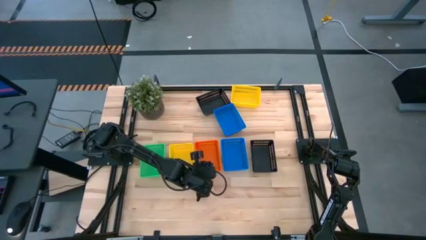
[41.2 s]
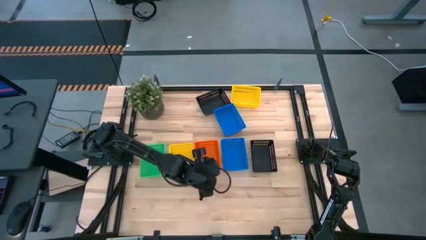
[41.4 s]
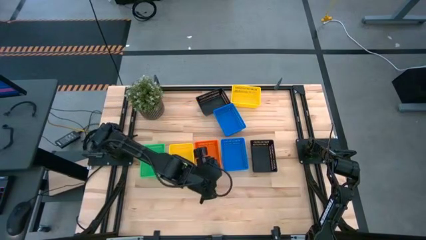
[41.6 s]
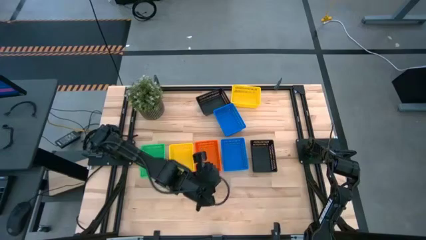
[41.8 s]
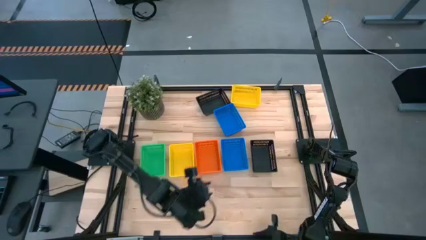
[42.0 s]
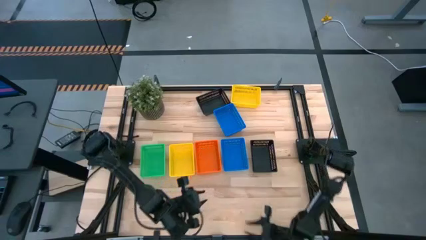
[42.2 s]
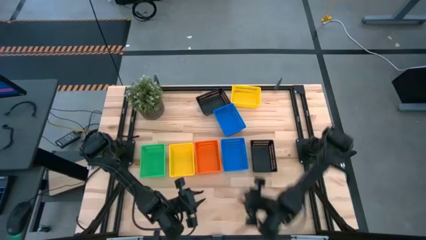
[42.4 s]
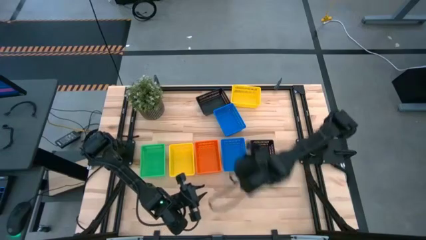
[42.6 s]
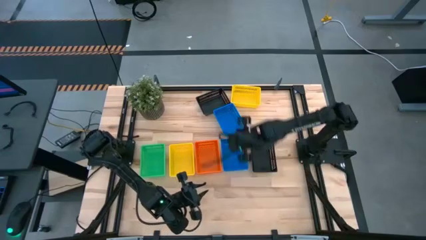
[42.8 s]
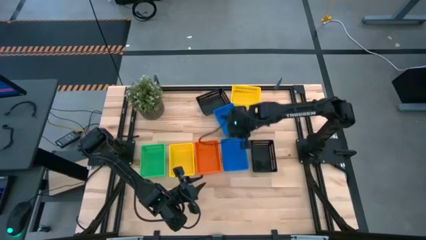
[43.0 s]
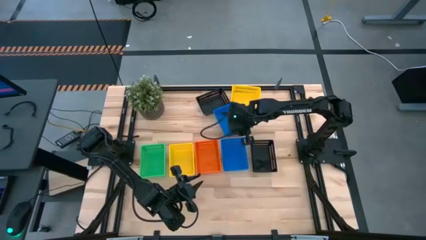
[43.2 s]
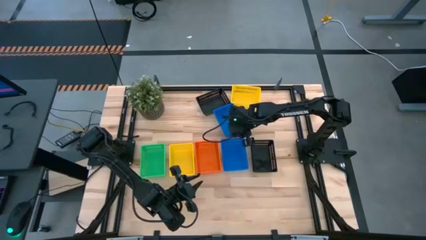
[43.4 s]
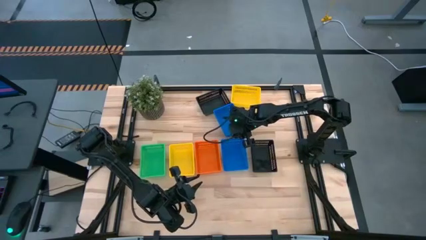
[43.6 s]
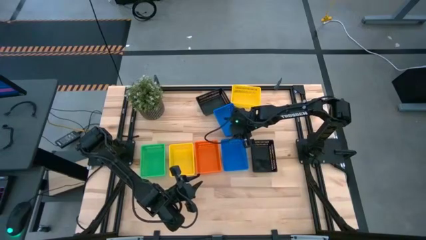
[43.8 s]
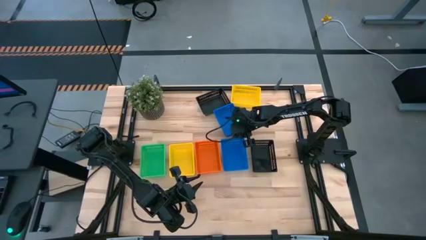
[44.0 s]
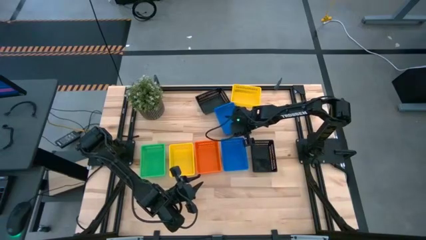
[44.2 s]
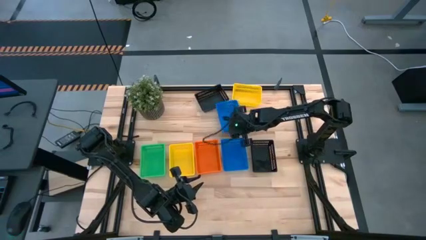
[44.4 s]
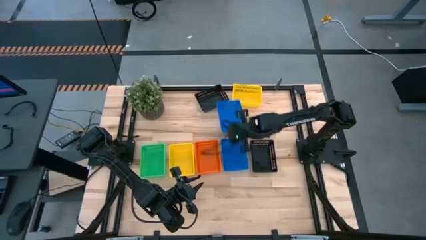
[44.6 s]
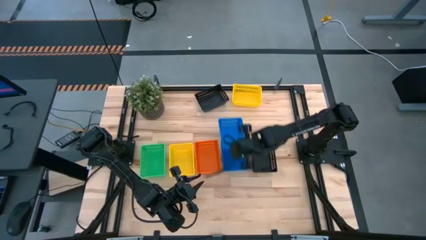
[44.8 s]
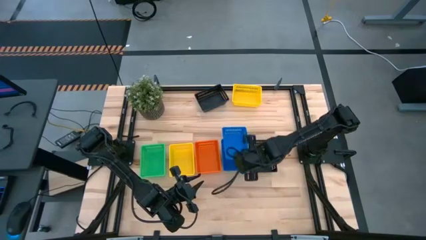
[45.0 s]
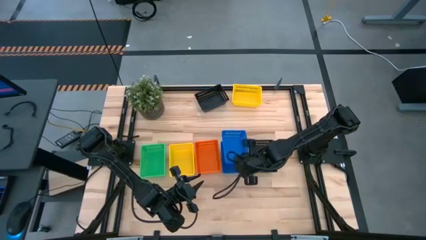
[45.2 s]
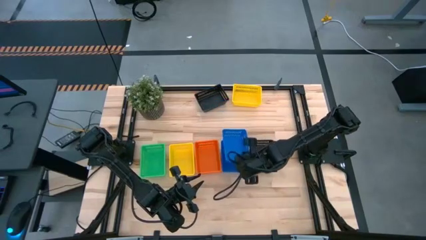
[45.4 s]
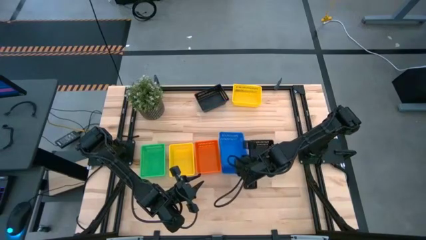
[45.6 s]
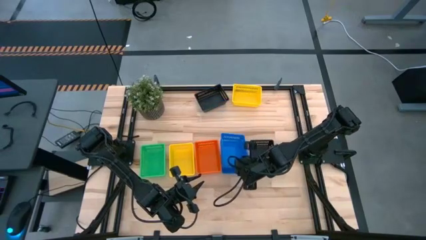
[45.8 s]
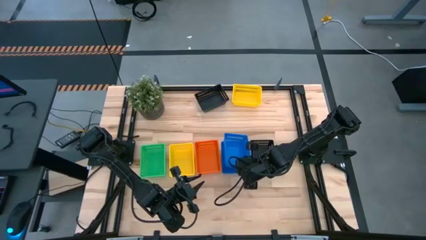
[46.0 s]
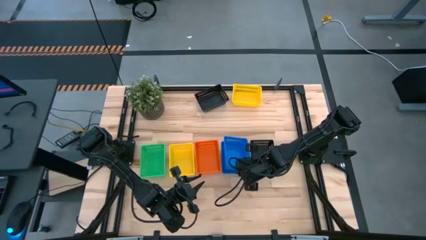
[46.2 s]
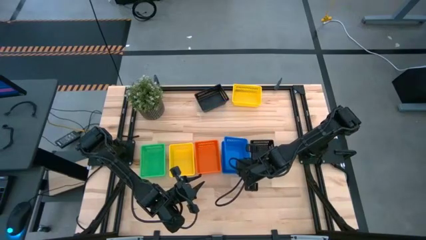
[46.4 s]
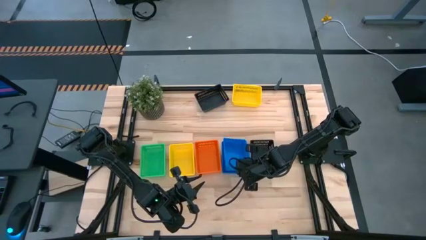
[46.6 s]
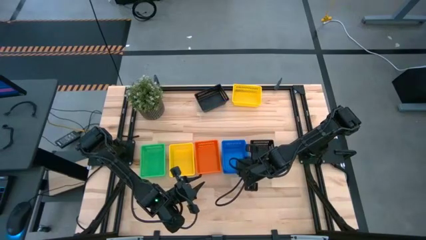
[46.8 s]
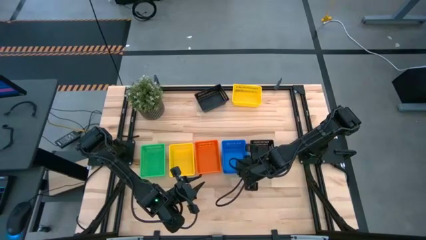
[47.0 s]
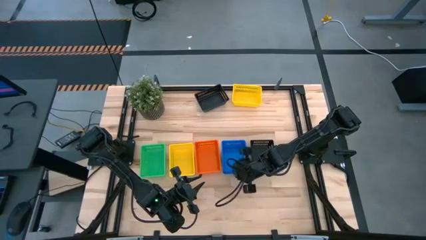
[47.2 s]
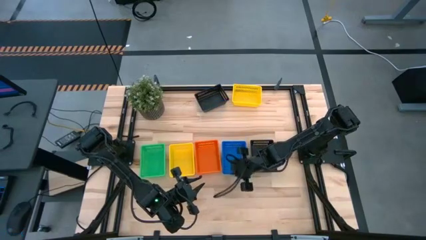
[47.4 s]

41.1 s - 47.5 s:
Stack the top blue bin on top of the bottom blue bin

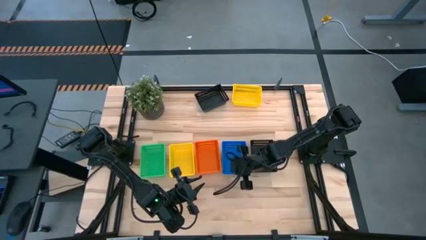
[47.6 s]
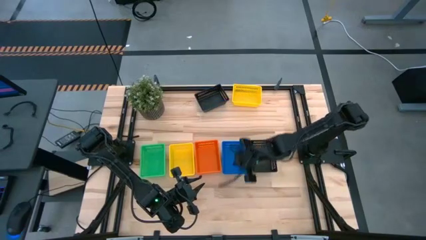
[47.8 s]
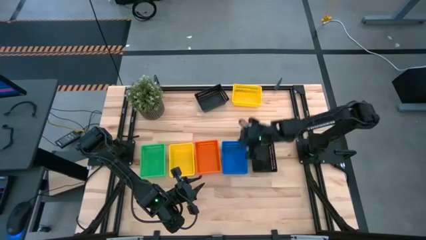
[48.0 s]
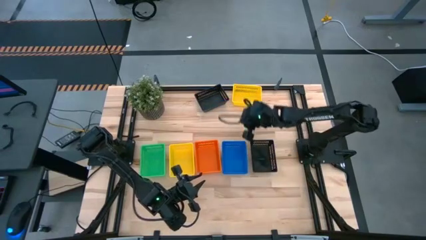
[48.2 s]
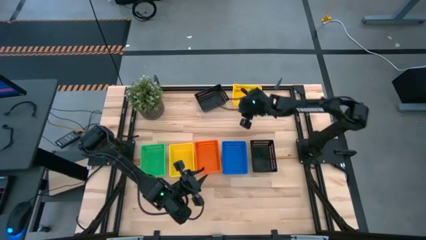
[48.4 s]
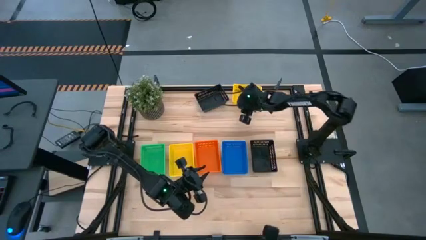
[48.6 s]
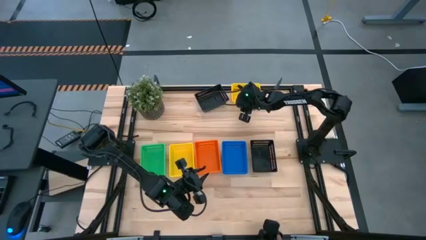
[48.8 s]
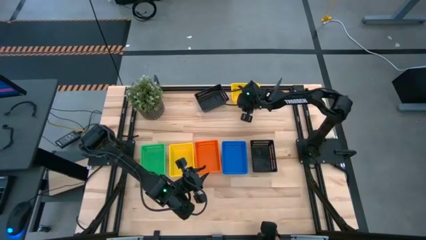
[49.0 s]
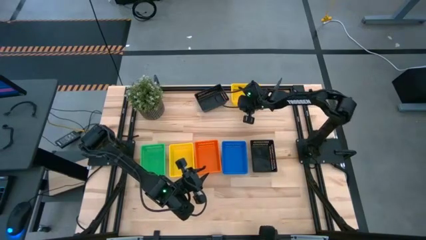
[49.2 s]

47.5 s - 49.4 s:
Stack the top yellow bin on top of the bottom yellow bin

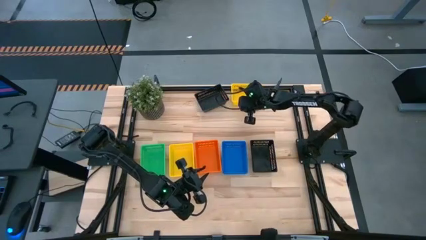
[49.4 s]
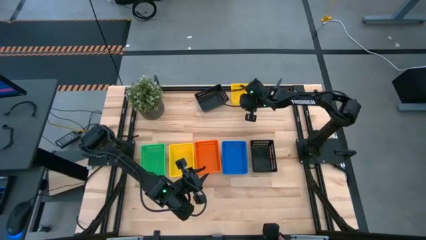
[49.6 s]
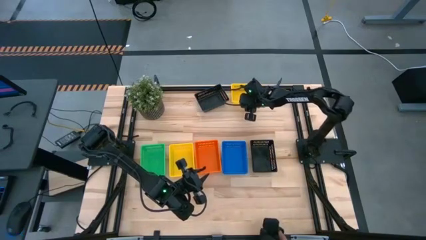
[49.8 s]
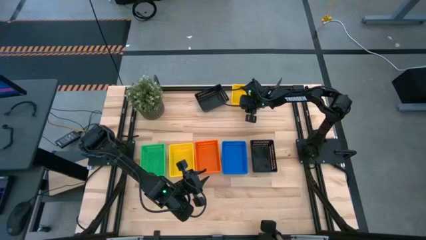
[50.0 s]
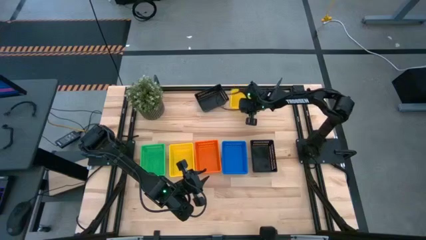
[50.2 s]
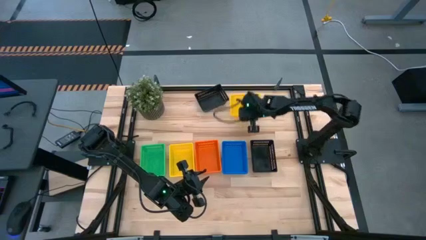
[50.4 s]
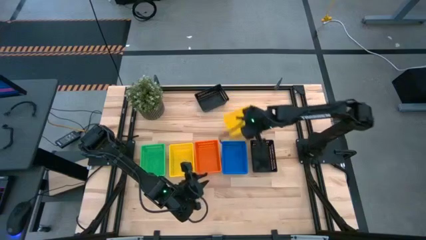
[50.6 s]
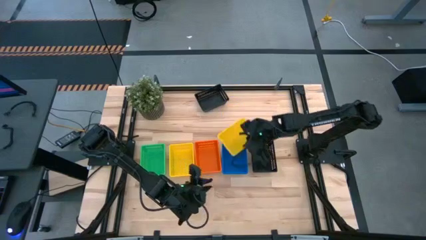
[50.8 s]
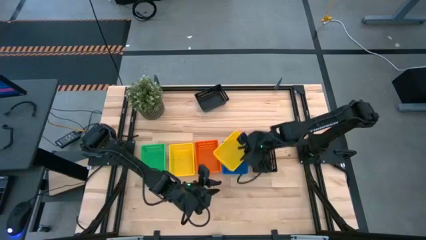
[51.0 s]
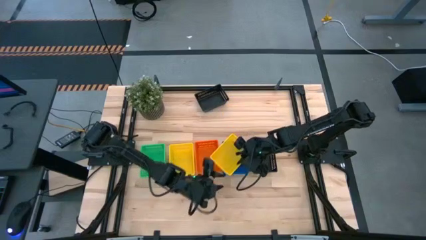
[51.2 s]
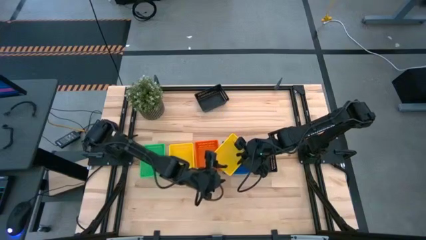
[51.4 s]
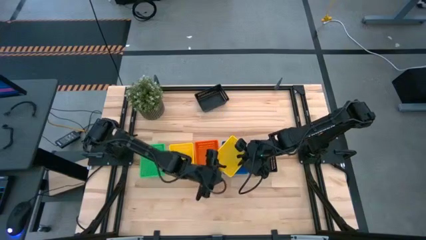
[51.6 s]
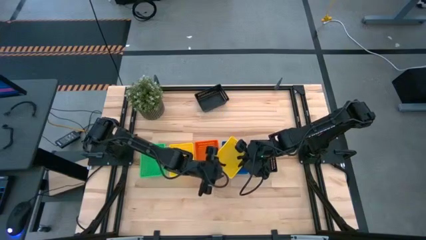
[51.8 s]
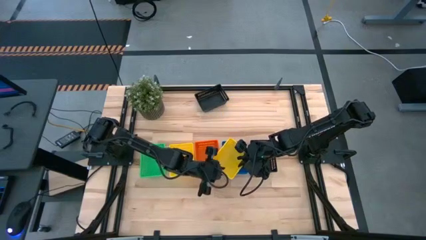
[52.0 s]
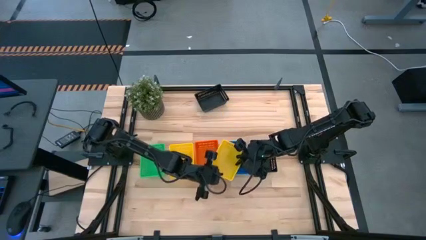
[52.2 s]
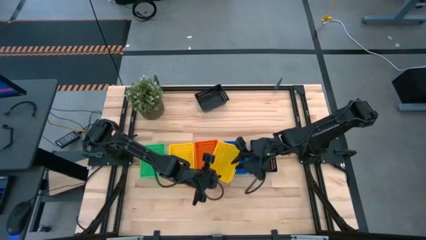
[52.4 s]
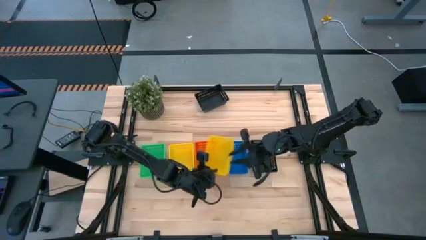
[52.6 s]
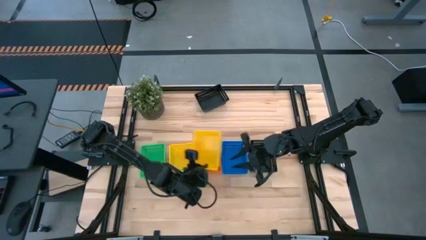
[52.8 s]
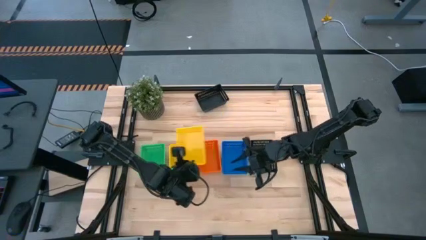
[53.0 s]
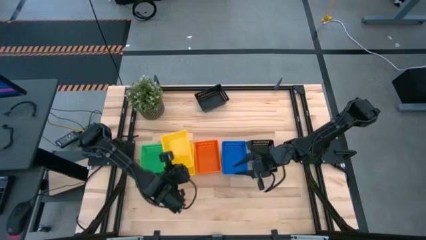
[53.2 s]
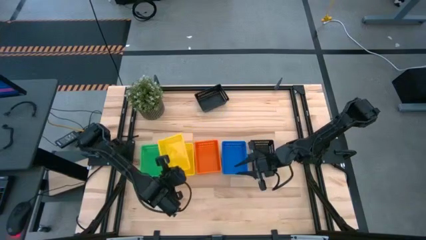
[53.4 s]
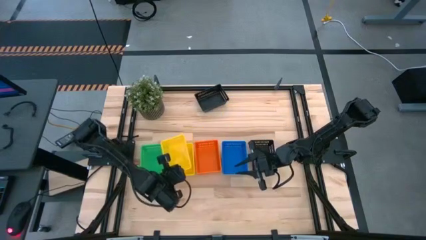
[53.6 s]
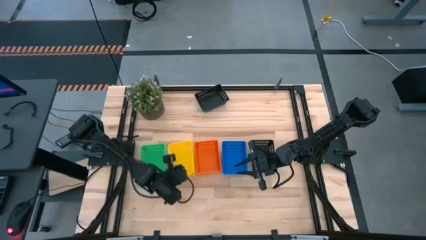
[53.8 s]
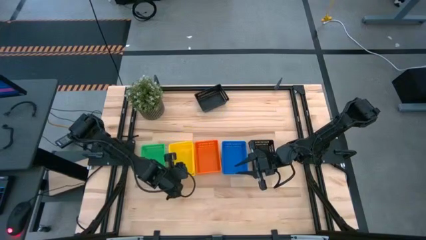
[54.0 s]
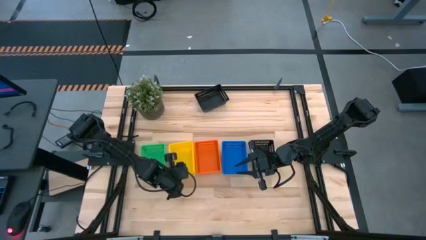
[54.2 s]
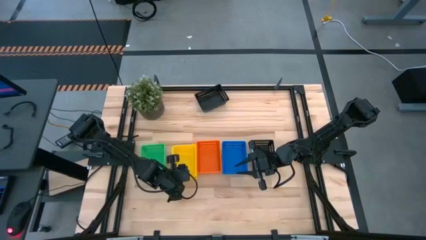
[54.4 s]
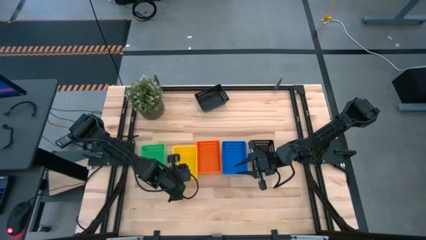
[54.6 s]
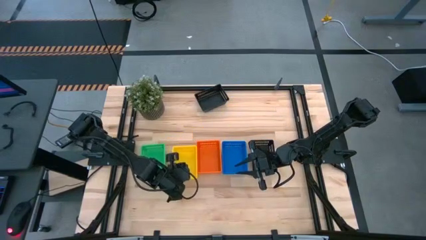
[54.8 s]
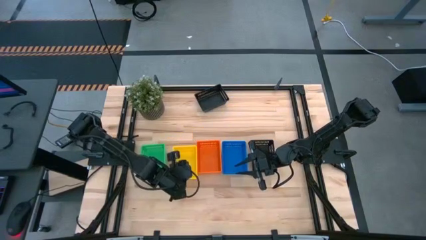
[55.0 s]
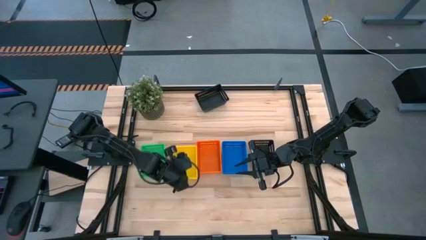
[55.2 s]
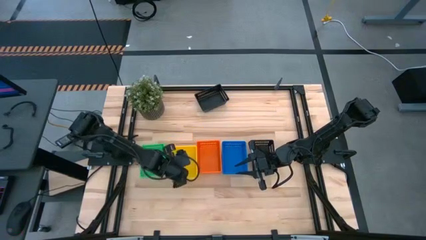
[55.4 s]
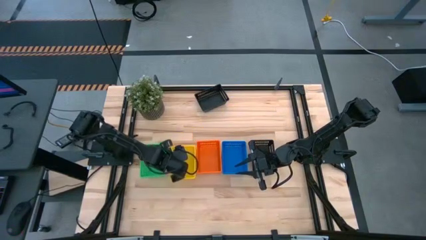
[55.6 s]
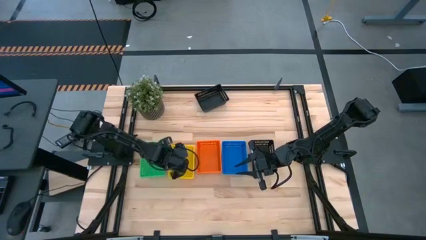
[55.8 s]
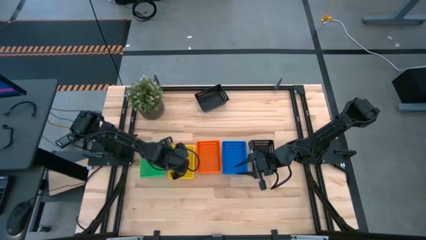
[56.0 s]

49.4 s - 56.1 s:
Stack the top yellow bin on top of the bottom yellow bin
